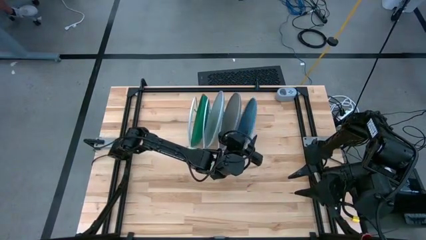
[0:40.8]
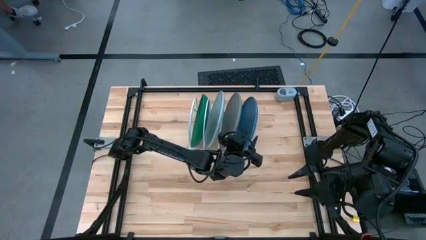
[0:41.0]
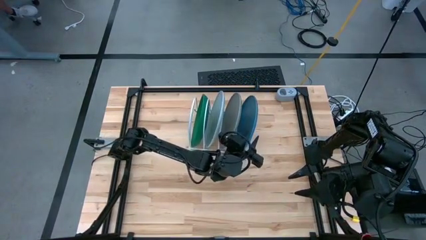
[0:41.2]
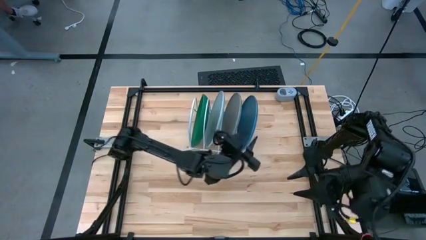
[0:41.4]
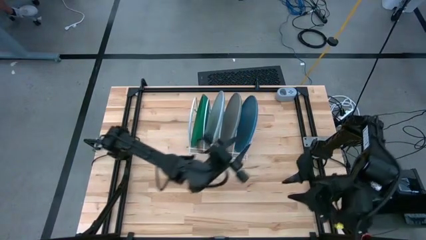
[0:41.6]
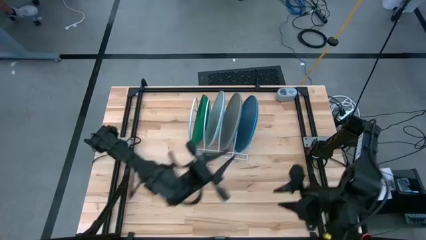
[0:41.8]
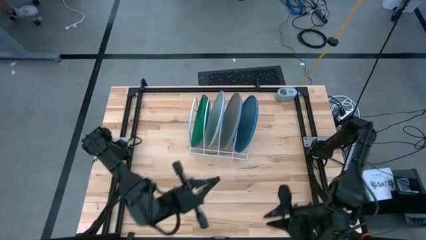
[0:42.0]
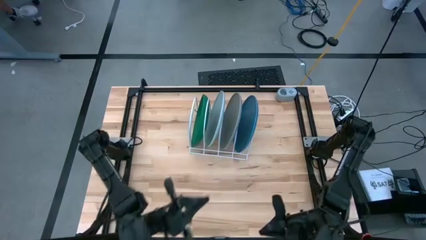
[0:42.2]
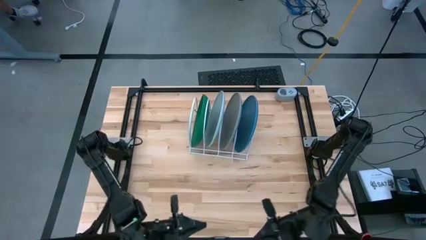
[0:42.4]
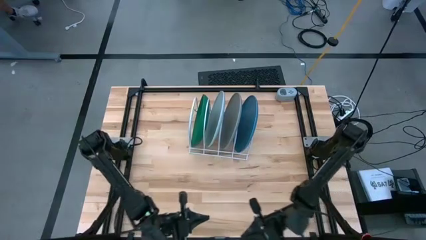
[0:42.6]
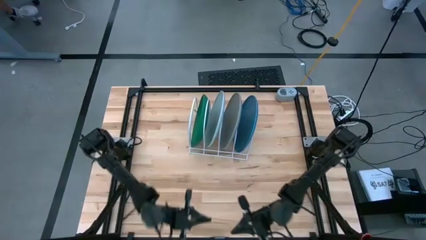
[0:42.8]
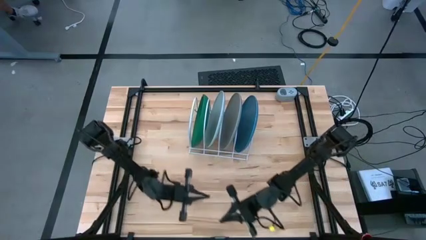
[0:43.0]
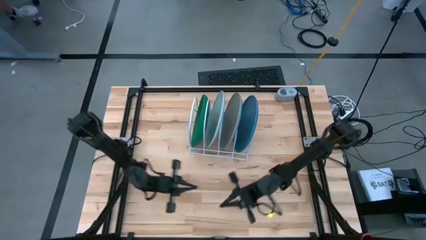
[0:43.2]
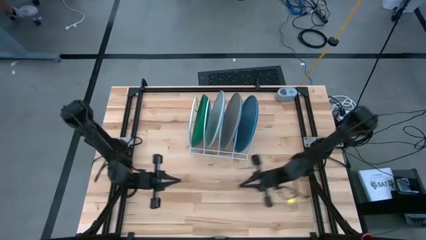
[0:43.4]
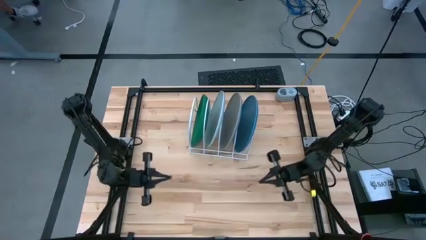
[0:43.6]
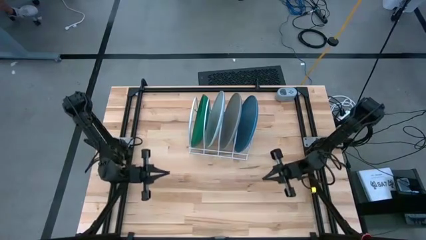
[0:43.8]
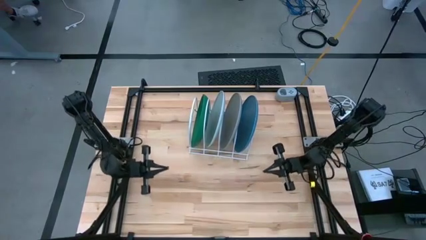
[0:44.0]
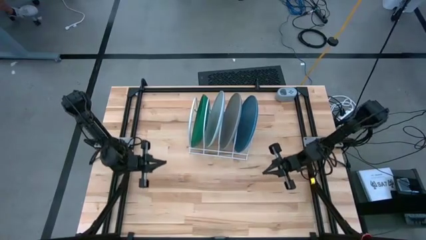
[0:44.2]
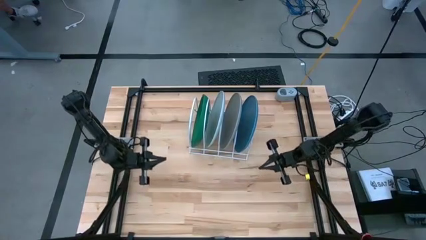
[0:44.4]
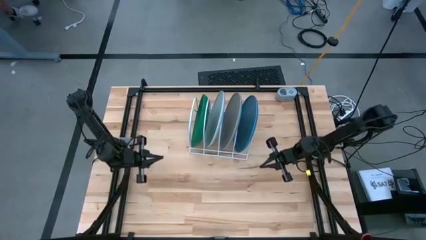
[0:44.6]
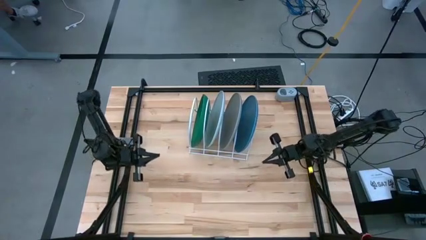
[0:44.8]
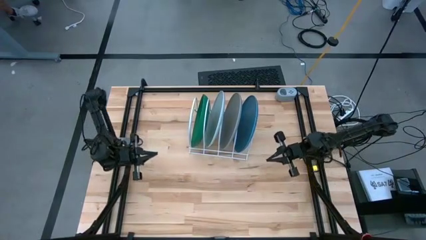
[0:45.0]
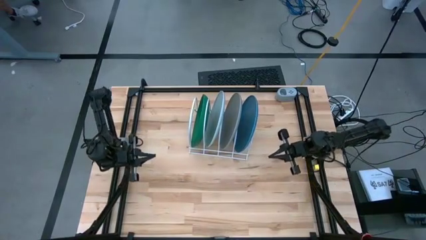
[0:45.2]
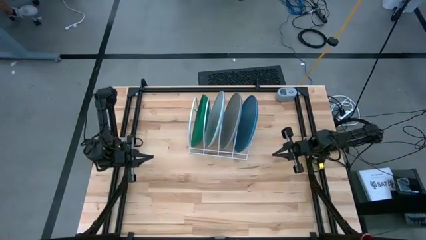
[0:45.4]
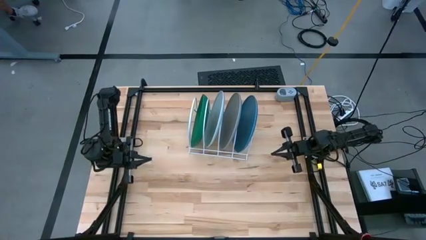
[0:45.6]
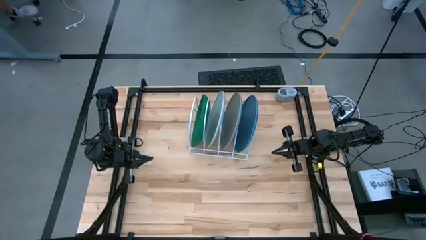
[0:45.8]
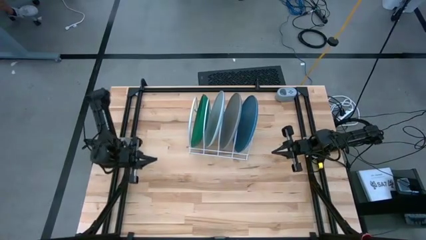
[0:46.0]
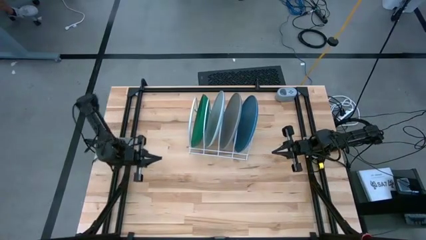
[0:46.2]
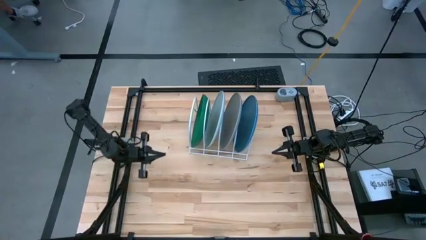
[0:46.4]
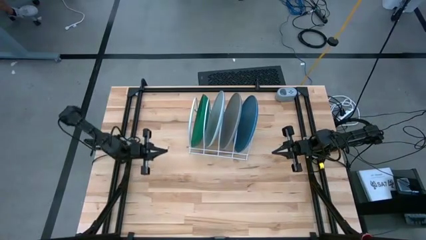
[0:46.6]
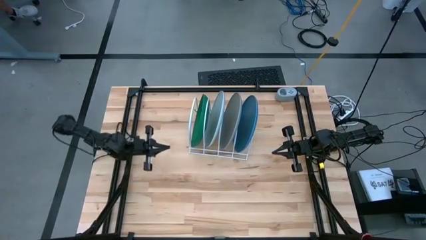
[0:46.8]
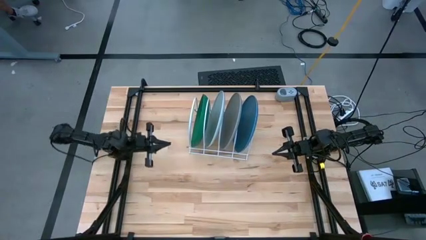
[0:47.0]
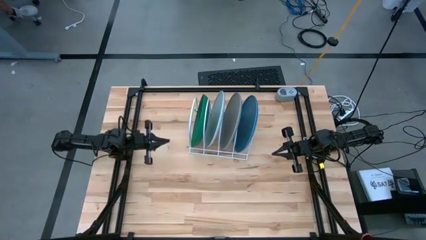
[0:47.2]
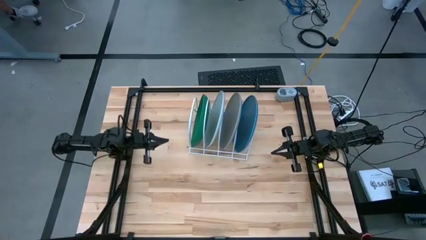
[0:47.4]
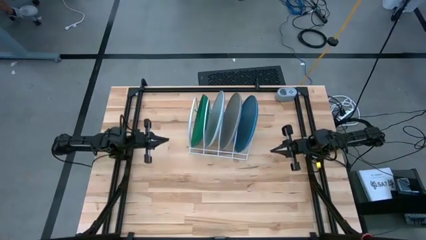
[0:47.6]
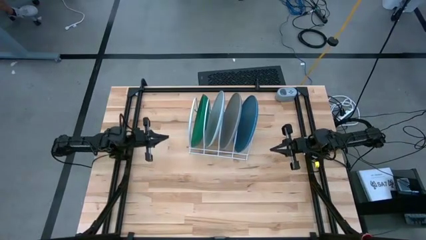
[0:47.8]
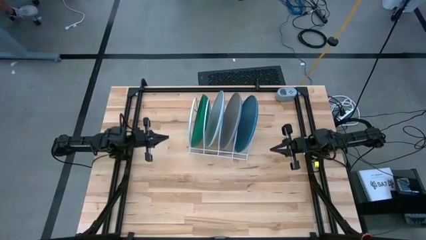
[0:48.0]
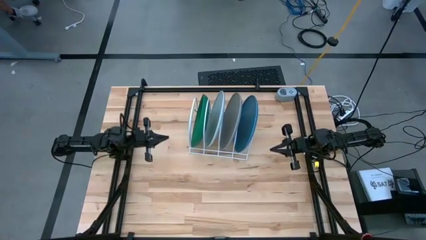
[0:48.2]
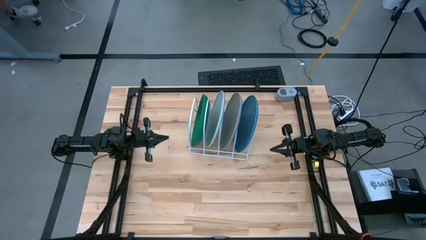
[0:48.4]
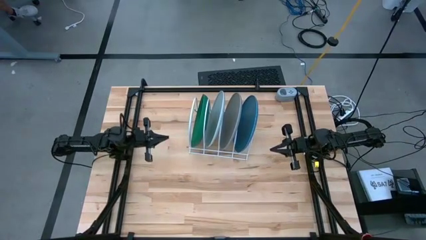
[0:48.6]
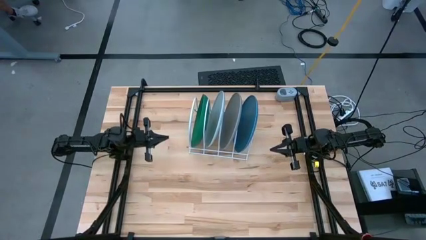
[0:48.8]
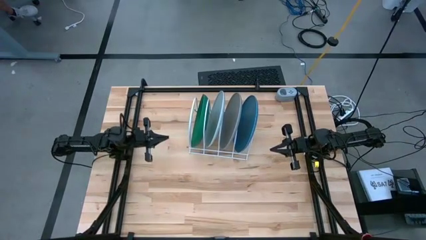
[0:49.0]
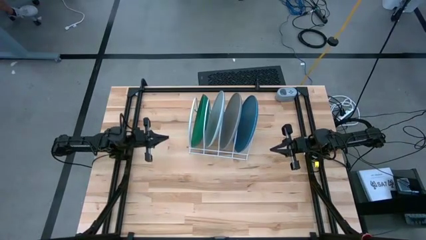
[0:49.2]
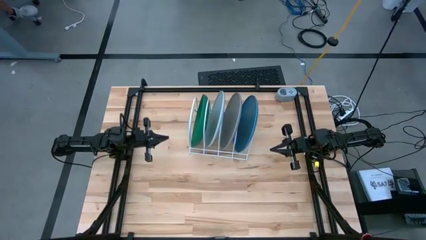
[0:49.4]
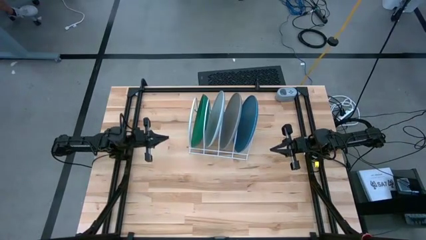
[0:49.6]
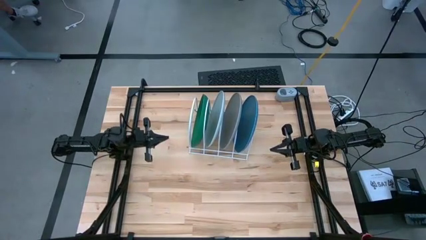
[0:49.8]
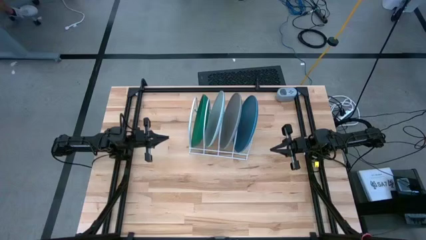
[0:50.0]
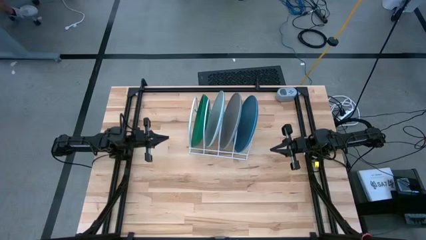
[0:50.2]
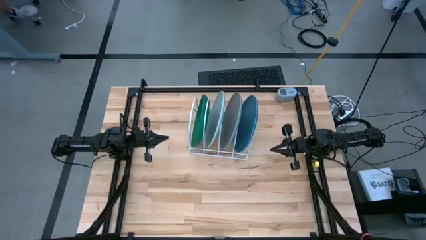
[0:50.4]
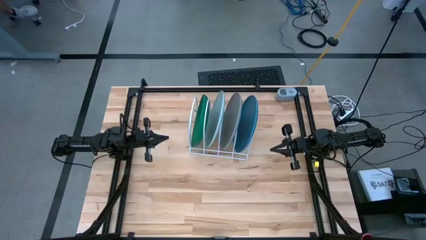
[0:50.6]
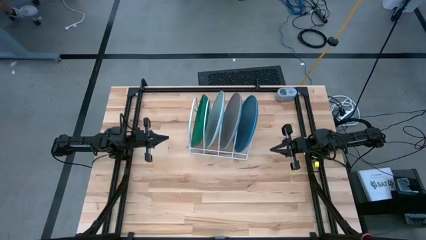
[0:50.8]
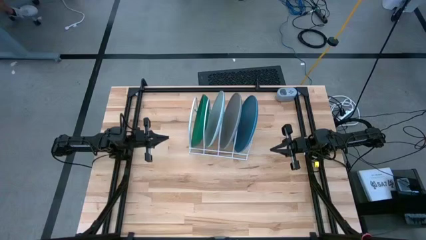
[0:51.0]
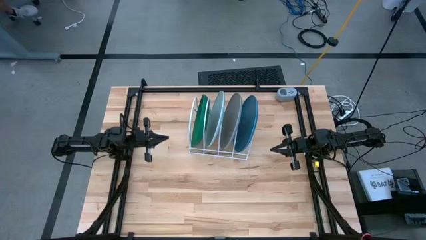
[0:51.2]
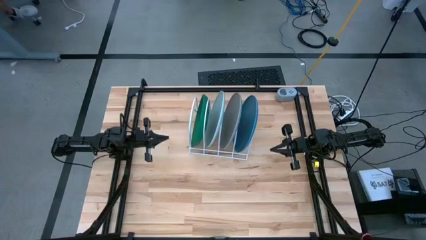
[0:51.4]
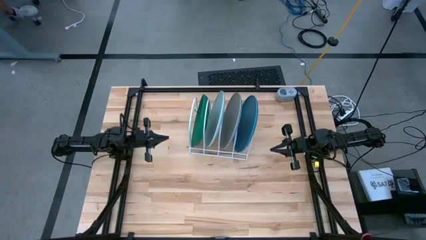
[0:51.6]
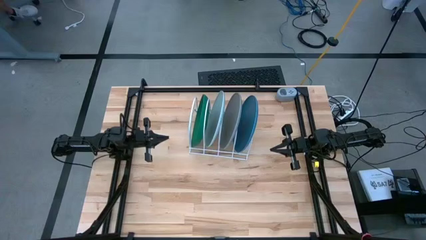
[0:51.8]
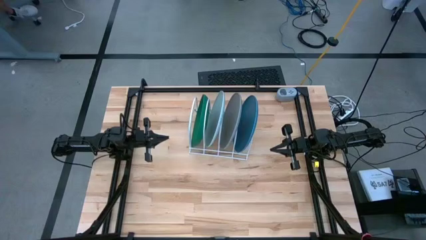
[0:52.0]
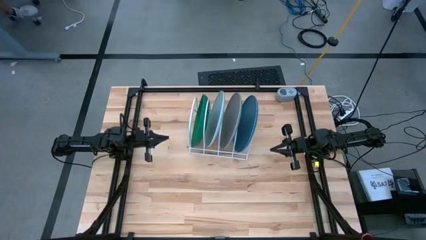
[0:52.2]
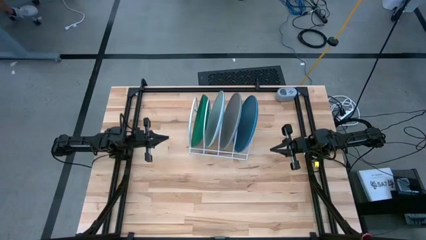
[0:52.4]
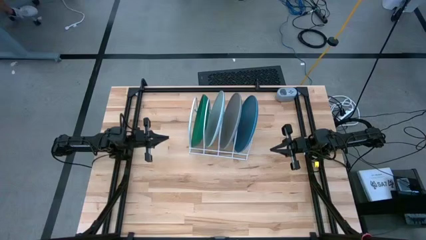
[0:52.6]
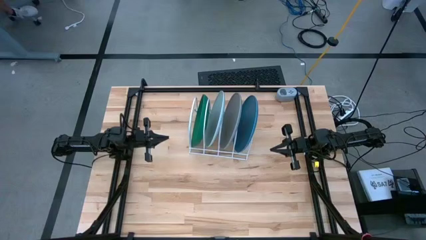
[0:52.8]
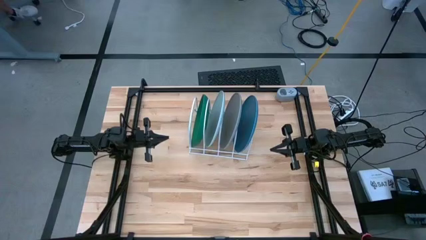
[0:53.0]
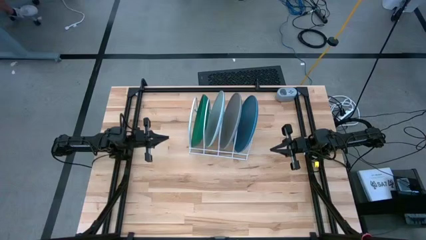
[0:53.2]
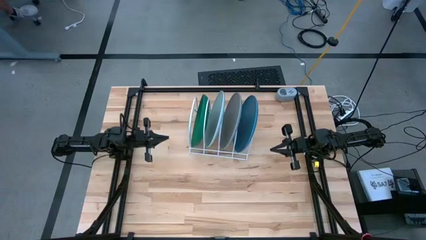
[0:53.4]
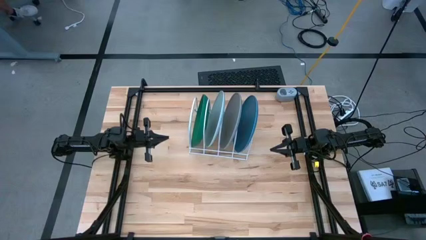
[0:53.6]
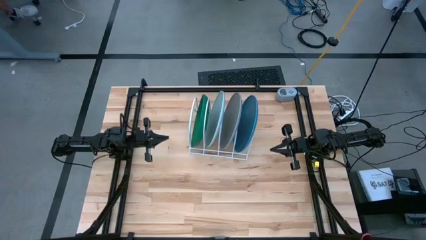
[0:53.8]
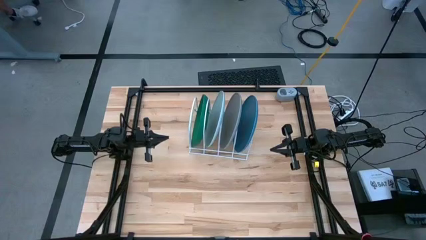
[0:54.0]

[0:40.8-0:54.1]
Task: Sort dishes
Return to Home Position
